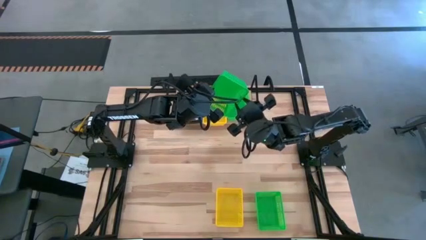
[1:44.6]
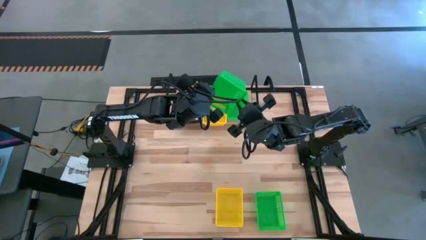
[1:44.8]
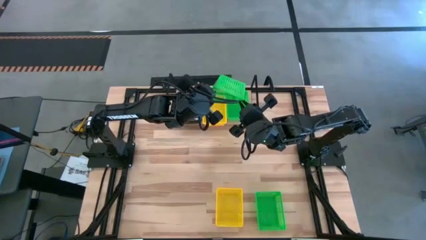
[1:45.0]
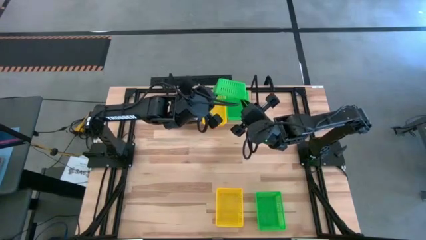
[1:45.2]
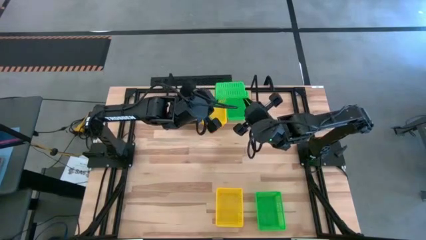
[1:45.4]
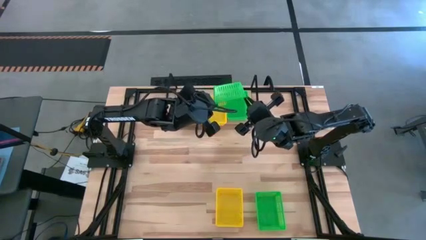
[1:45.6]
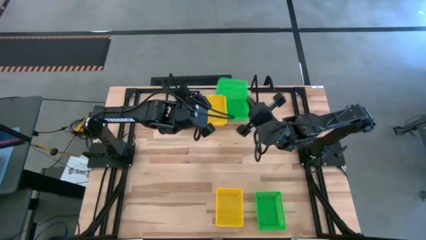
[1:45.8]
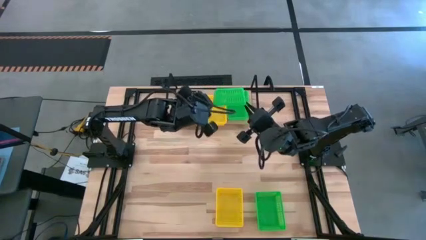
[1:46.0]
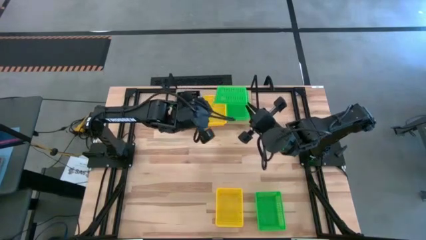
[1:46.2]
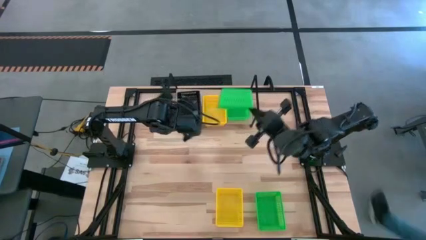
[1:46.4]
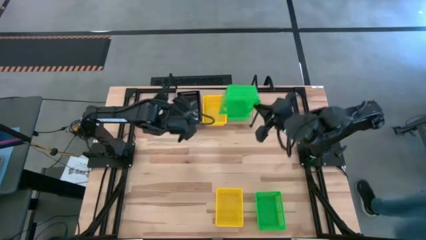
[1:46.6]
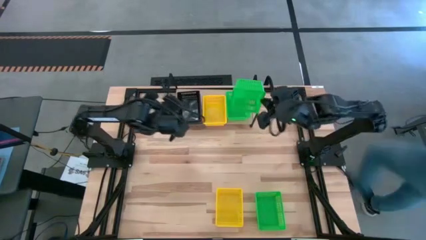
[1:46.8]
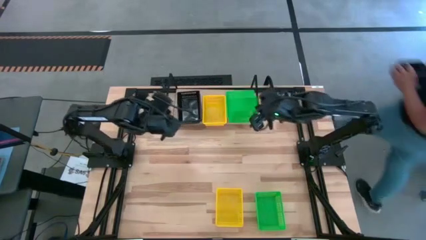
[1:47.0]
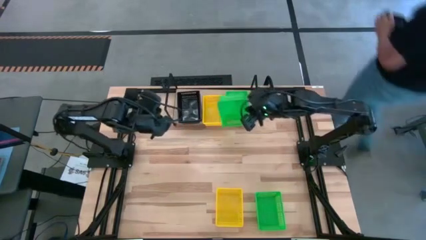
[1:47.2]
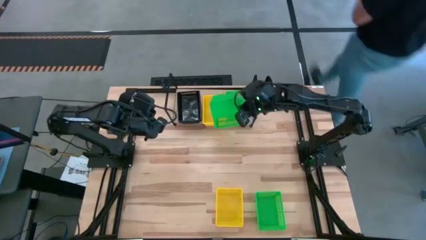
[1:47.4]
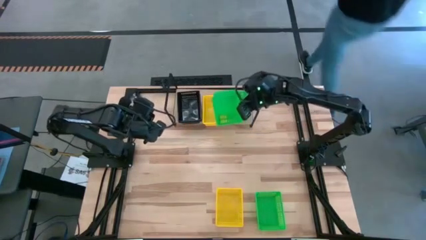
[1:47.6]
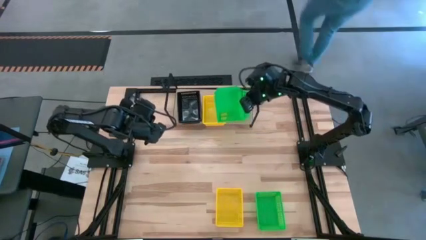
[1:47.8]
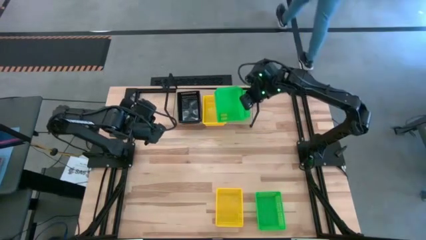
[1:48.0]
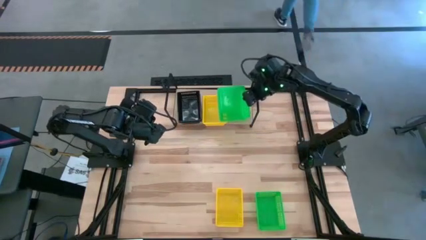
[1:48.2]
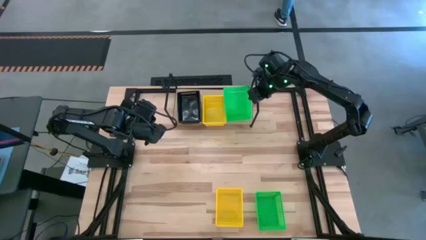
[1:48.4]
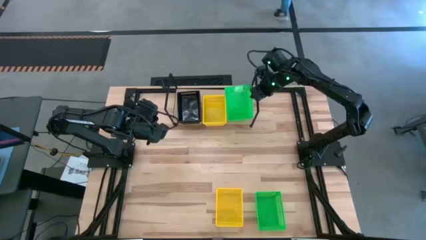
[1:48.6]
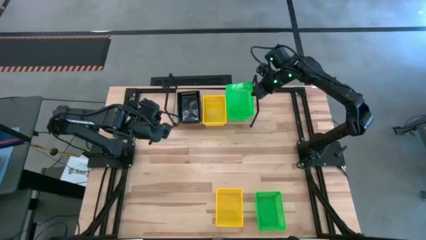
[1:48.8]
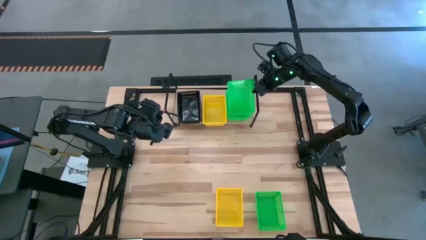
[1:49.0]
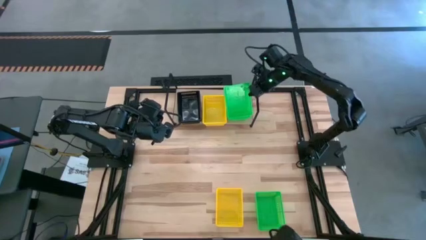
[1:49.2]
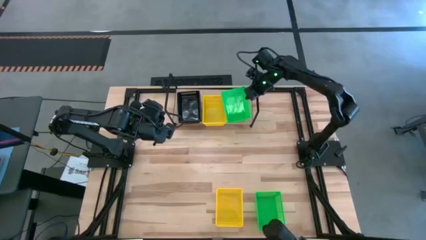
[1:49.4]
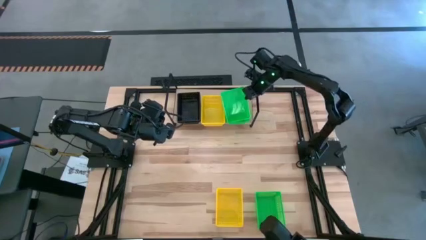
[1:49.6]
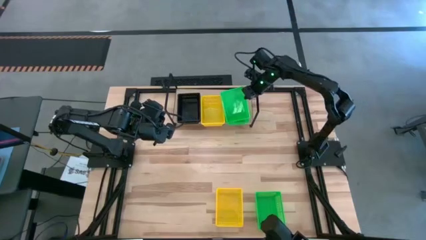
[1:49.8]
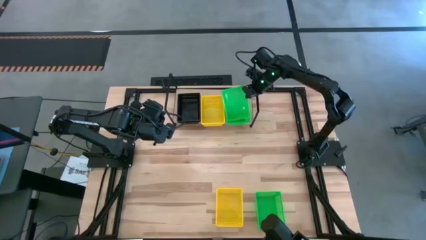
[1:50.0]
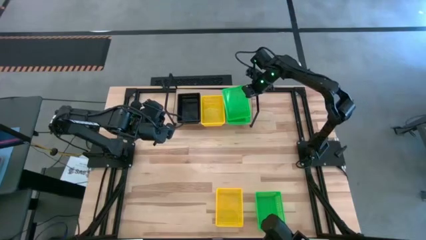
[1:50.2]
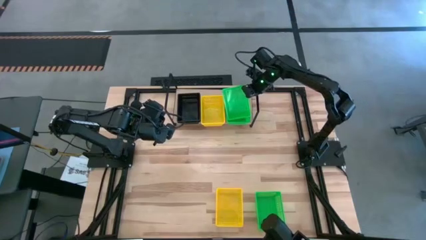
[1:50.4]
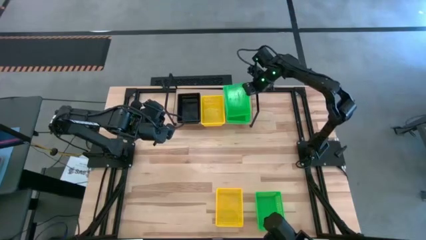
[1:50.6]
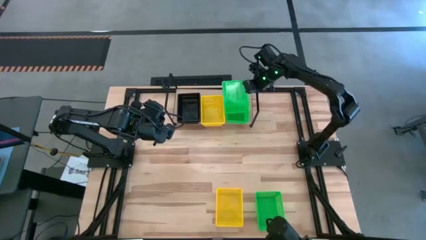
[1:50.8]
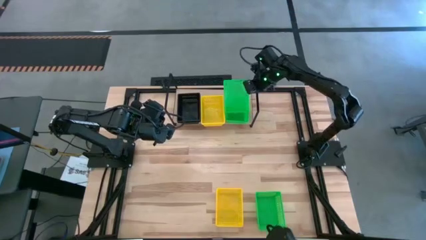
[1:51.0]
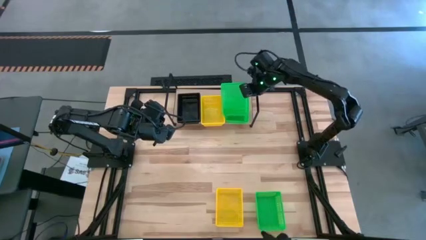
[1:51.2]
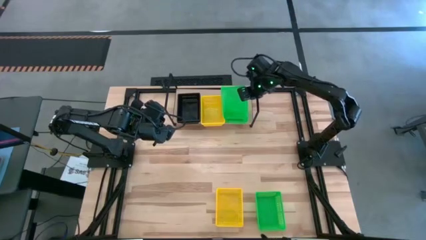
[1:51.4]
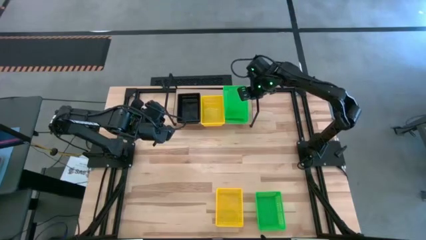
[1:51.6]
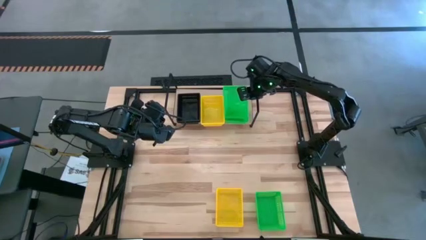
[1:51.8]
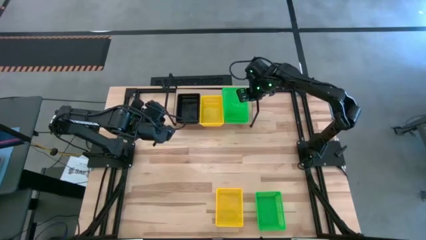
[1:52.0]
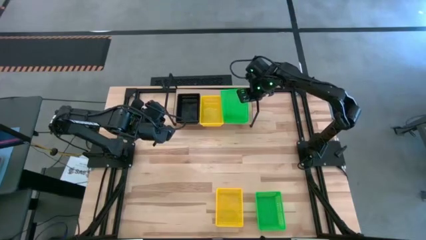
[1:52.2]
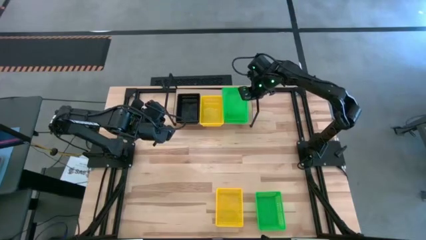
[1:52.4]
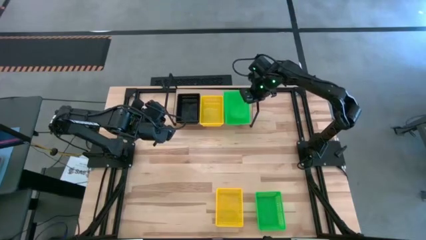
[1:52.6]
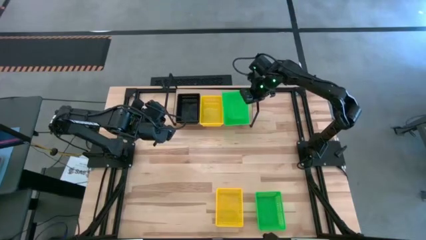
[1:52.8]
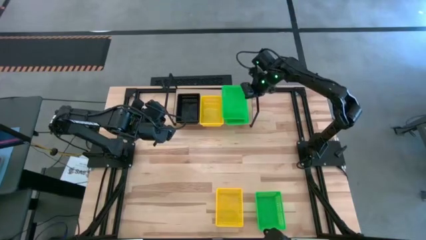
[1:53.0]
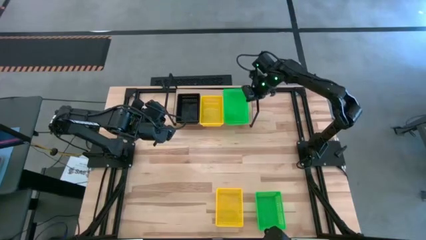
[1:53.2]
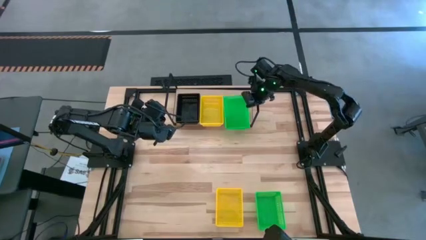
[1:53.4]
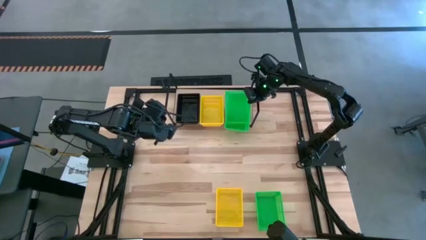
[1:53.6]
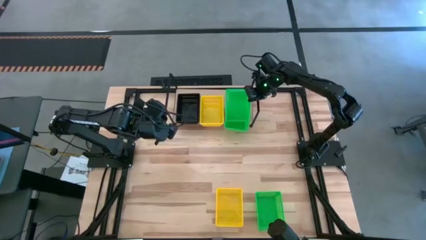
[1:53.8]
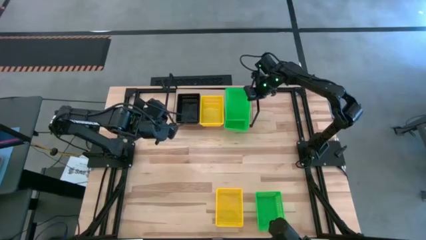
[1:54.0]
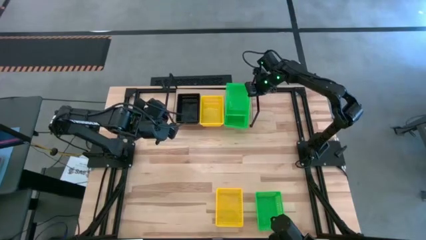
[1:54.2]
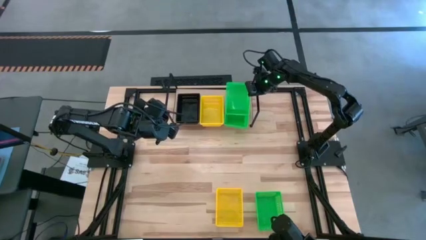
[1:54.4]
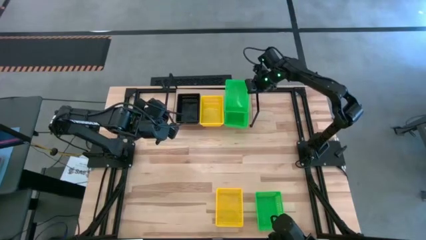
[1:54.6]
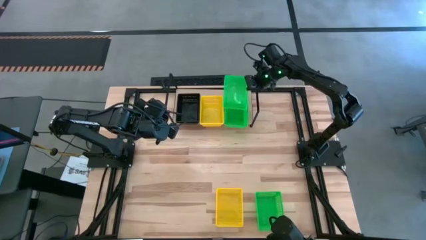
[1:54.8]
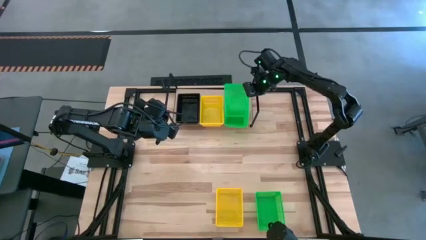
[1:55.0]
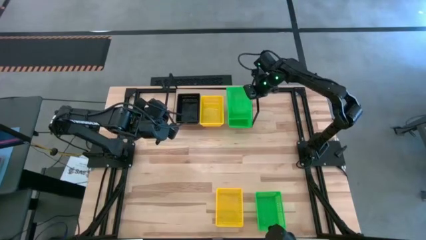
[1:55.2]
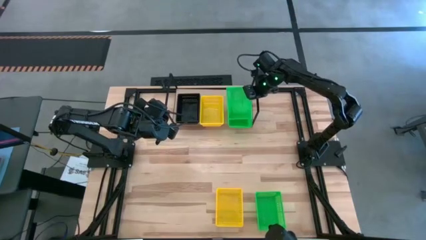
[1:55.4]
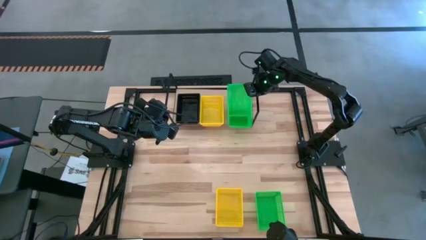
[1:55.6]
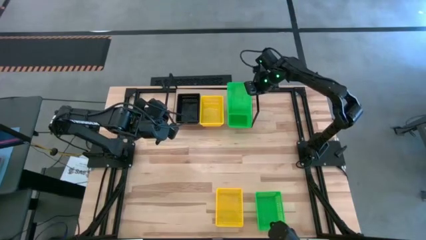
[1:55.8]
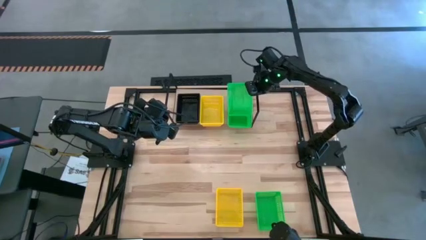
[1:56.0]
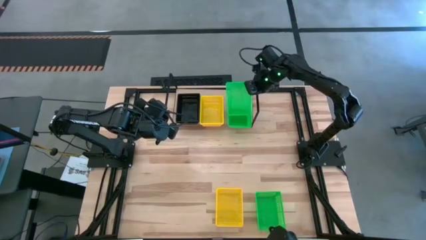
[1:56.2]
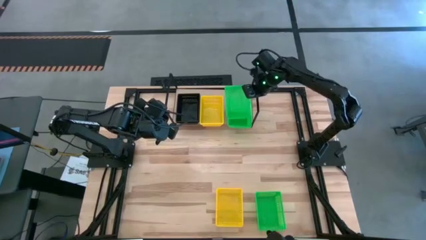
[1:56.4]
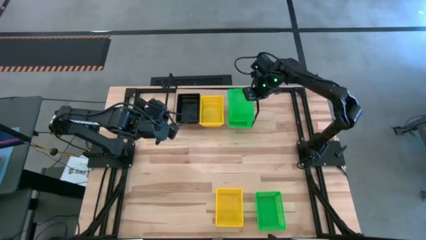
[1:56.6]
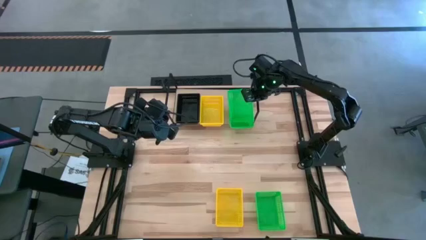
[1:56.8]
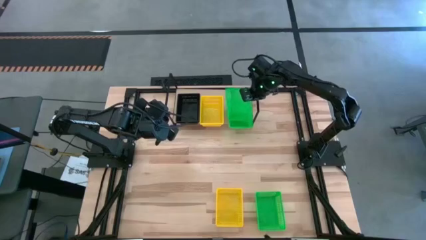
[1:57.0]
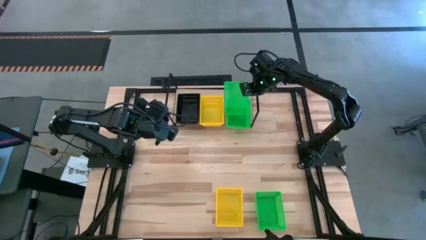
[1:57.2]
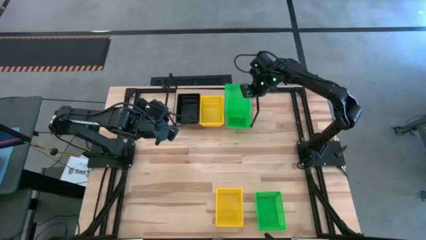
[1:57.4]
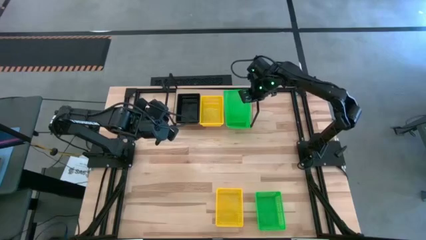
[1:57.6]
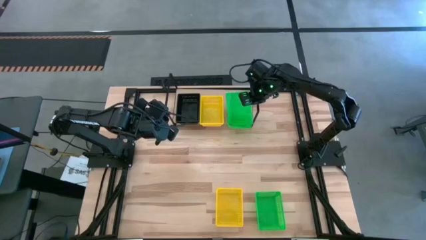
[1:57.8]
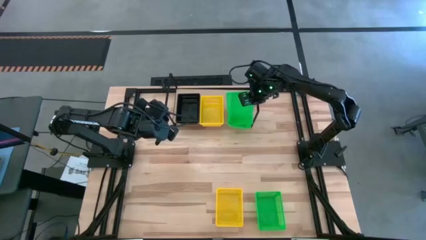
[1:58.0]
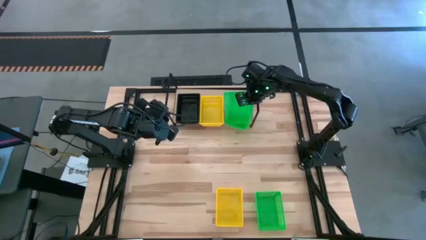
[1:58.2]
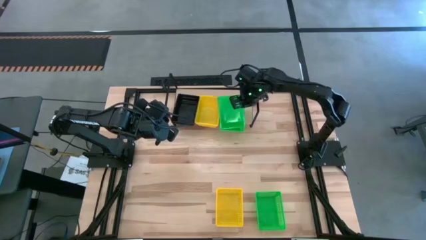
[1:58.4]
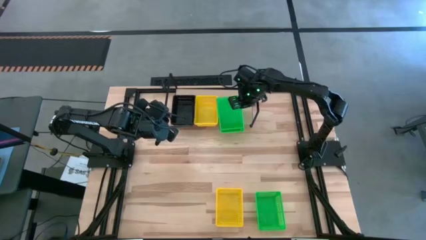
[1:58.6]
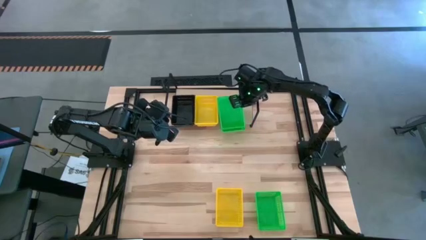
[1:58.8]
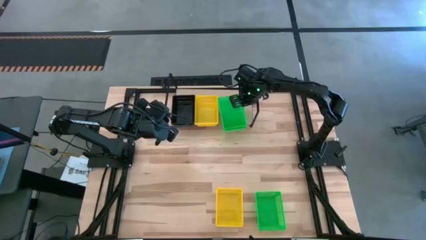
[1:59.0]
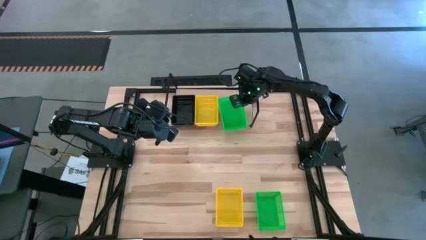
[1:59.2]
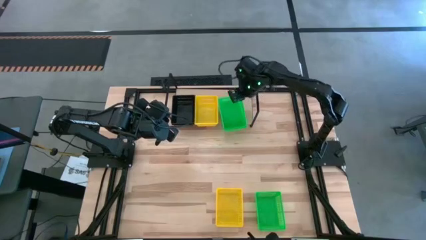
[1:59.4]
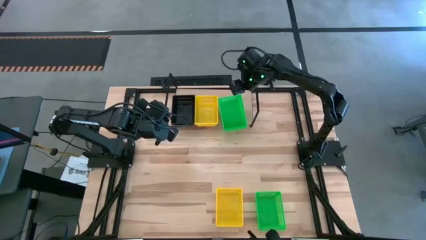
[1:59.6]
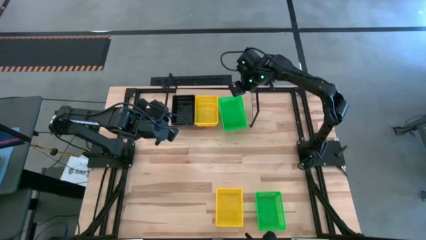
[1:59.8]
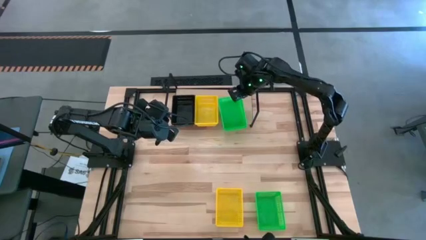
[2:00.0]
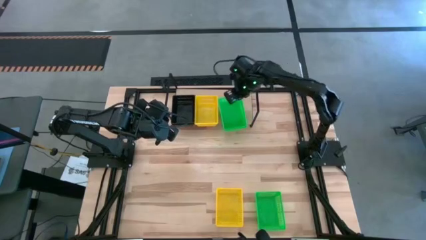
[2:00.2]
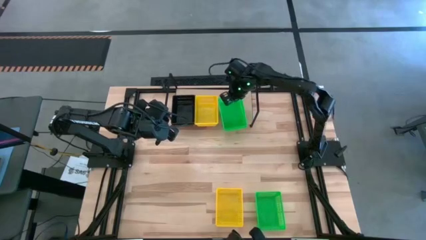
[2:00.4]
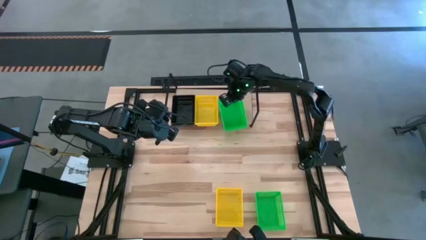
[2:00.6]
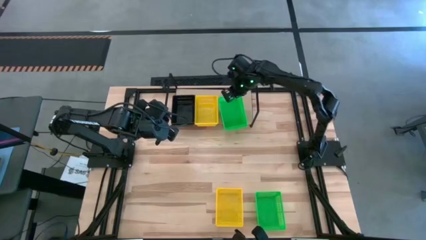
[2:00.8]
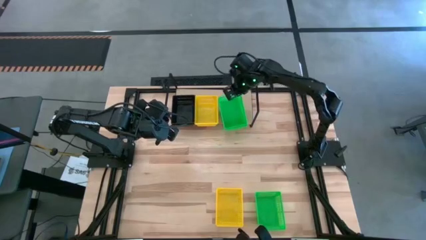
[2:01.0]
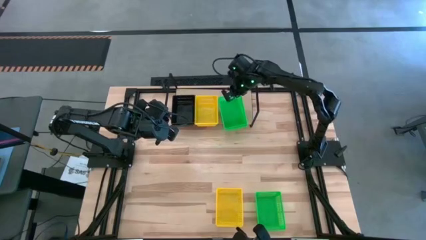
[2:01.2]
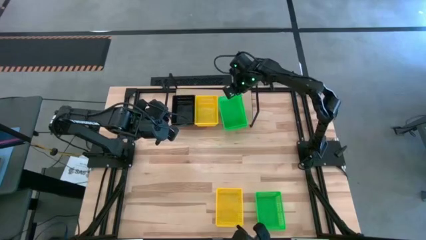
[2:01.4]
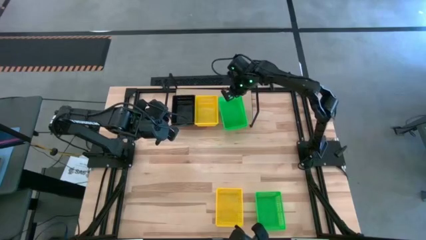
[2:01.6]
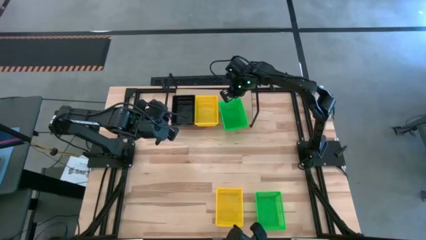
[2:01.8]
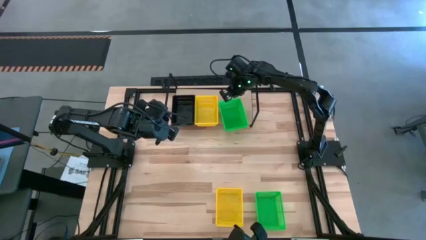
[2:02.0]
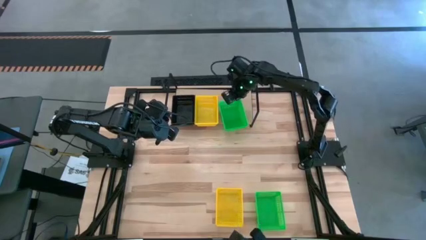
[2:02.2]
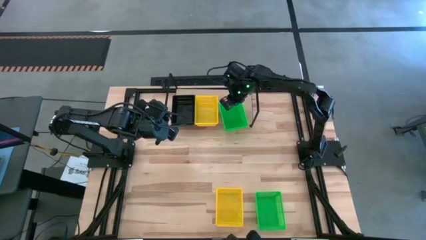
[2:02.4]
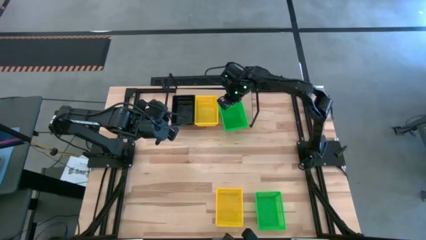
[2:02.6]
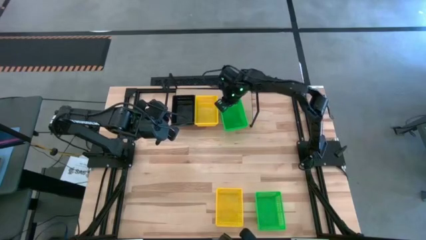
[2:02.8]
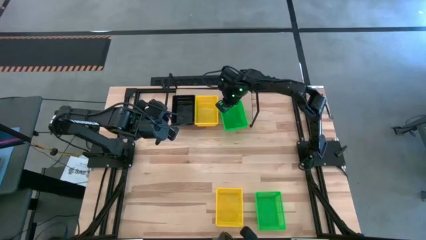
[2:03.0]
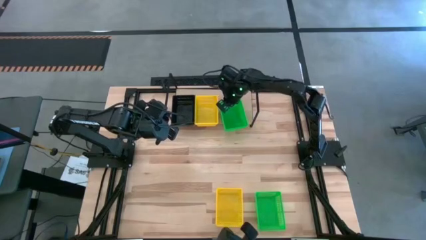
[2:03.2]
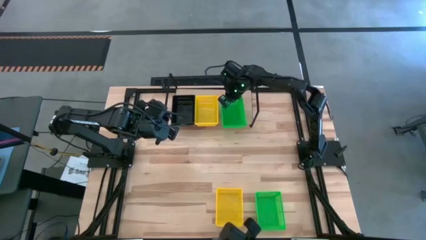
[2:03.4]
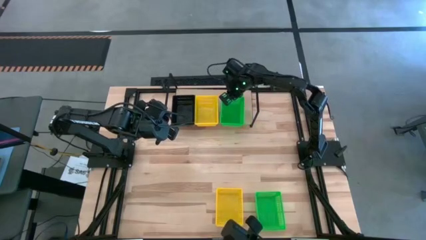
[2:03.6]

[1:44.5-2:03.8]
Task: Stack baskets on shelf by color
Stack the top green bin on top of the stacked green bins on the shelf
